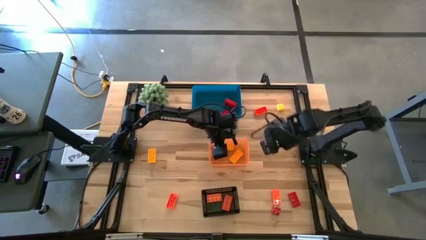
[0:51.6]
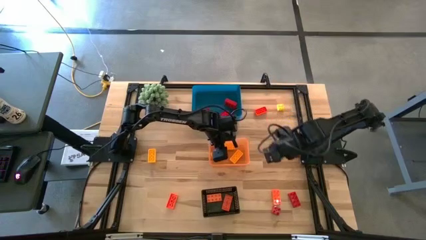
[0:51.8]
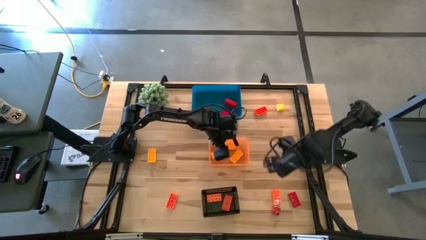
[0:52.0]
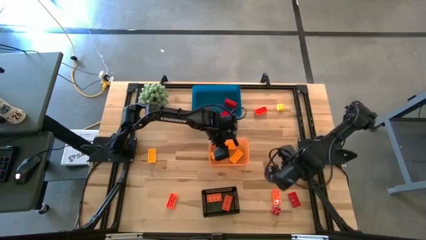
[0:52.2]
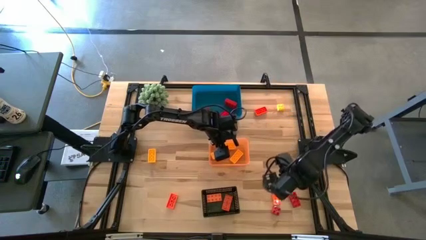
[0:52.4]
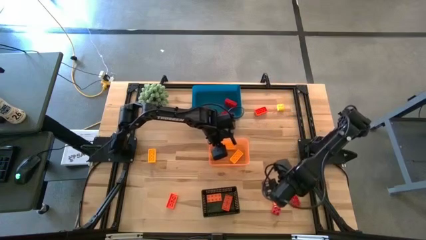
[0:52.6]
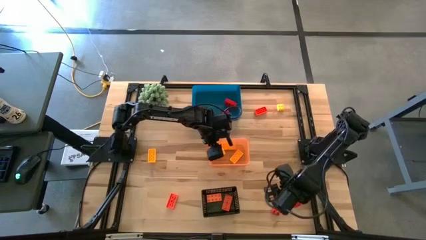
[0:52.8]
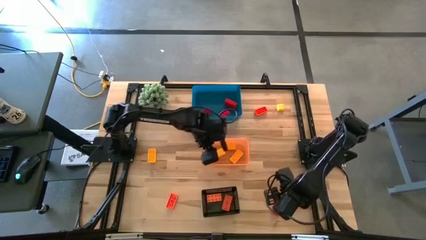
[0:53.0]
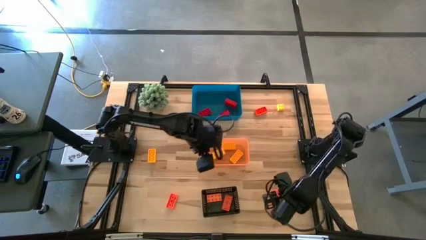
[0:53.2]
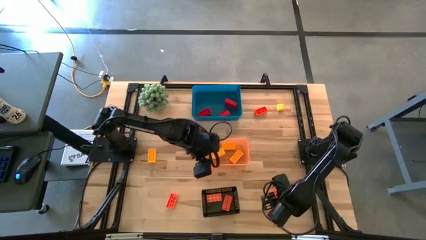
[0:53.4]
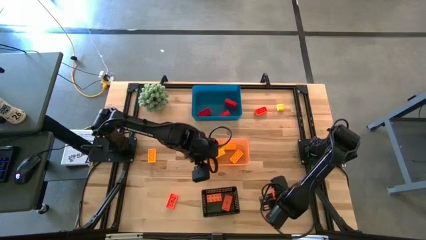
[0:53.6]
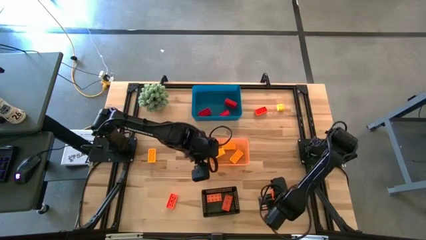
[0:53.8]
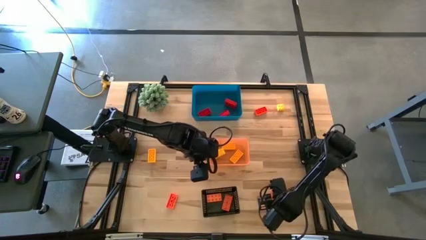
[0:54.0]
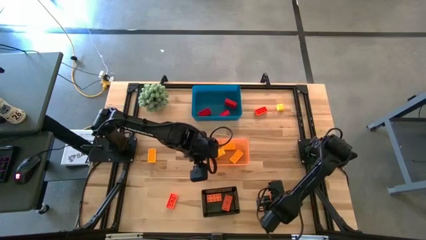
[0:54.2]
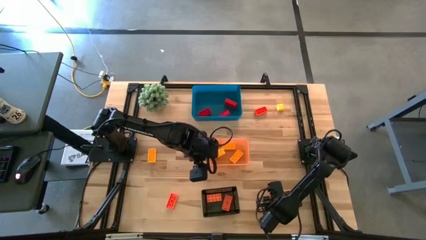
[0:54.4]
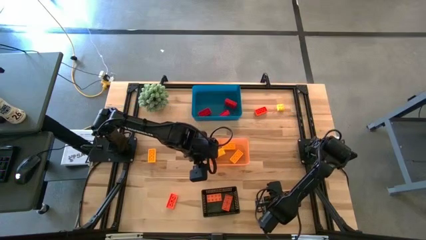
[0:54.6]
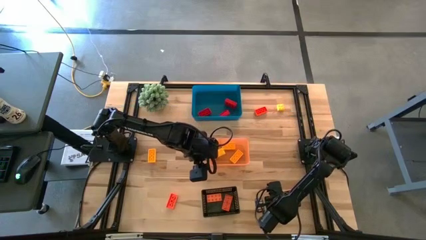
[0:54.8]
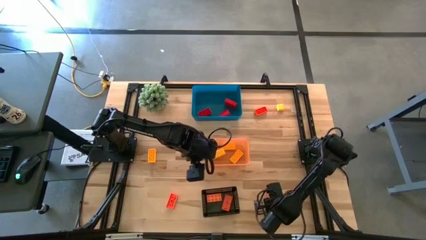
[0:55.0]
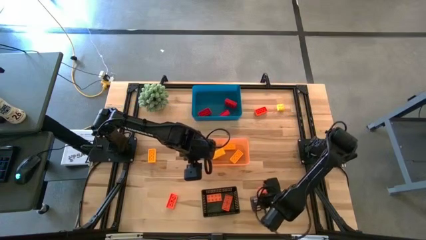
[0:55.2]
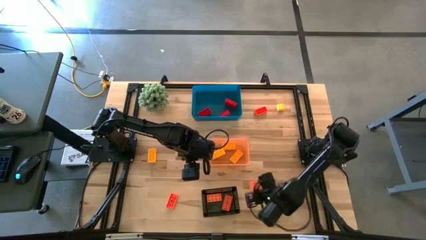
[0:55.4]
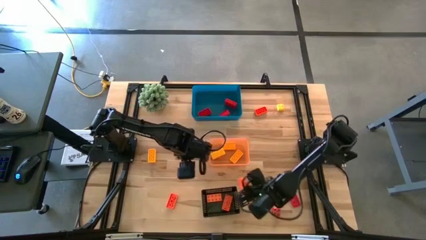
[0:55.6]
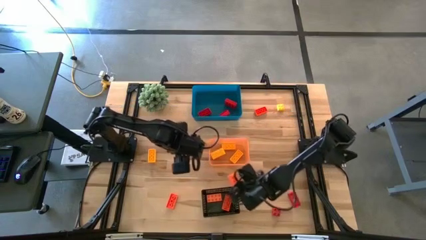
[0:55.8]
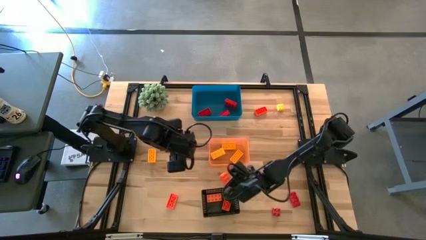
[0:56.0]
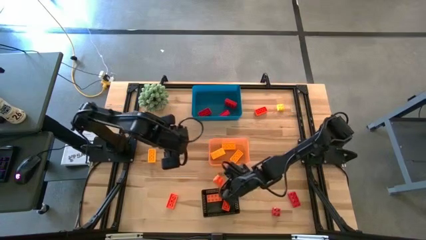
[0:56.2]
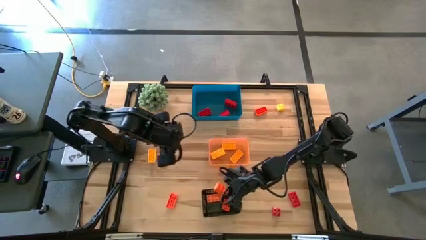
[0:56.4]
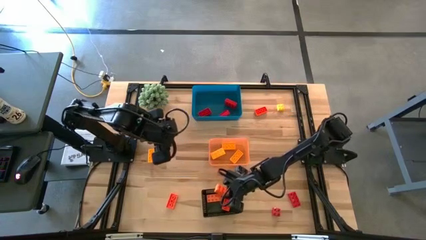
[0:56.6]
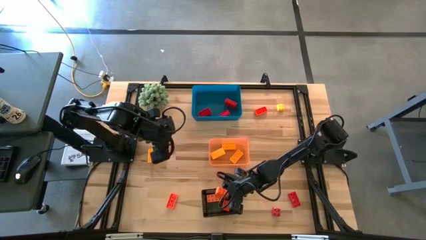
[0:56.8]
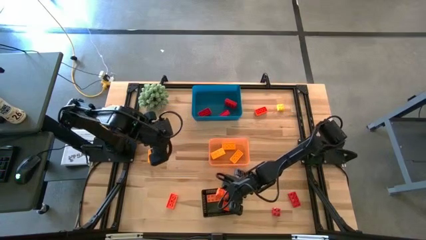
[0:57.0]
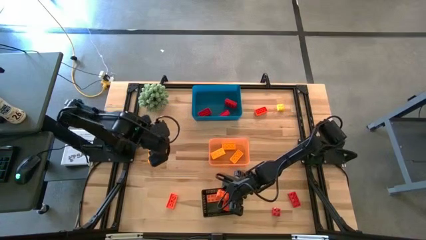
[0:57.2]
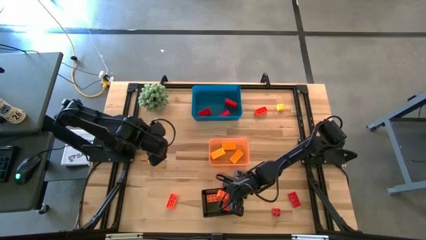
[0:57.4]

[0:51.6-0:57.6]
Task: Sort & place blocks by color
Put the orange game piece into the black bin

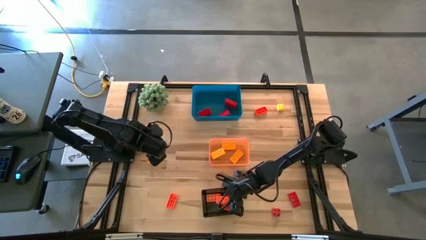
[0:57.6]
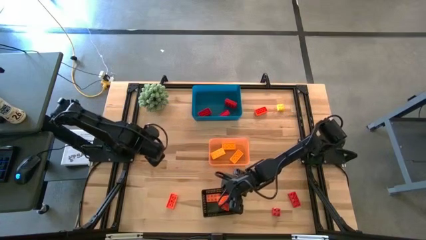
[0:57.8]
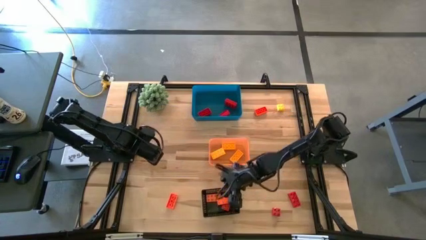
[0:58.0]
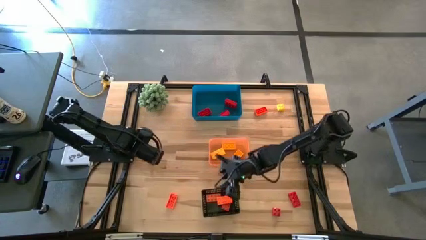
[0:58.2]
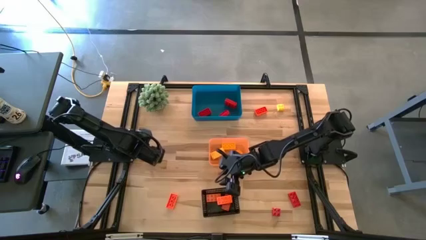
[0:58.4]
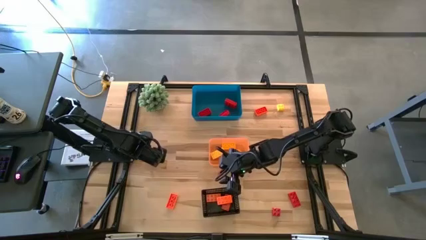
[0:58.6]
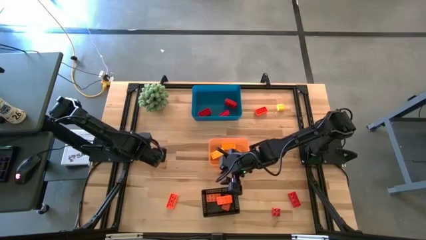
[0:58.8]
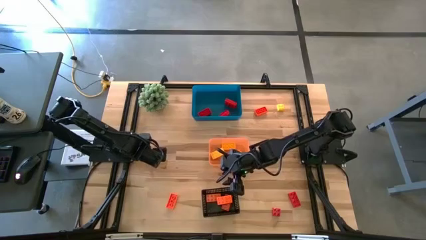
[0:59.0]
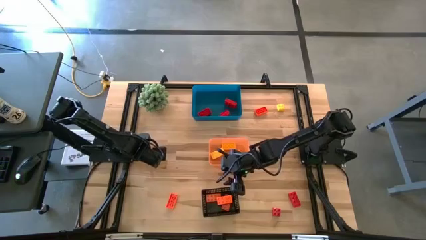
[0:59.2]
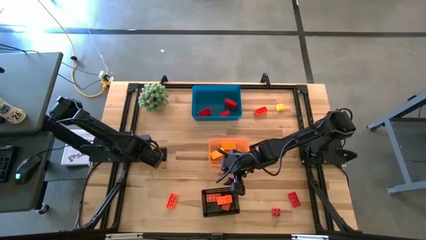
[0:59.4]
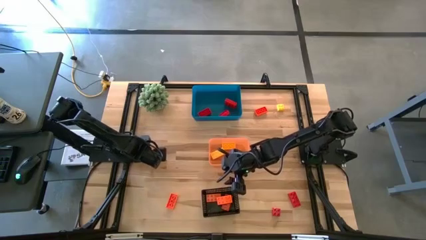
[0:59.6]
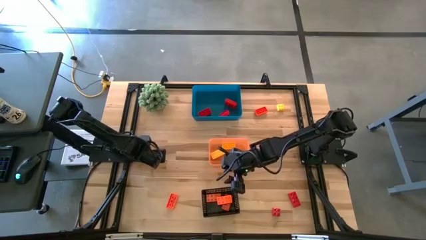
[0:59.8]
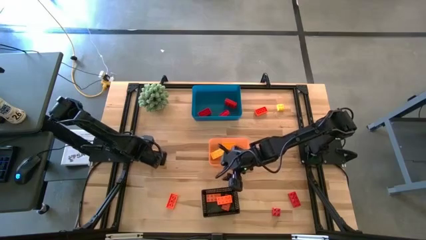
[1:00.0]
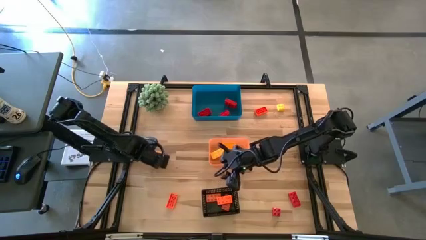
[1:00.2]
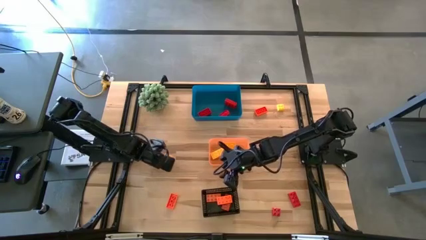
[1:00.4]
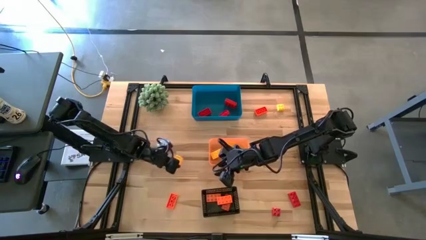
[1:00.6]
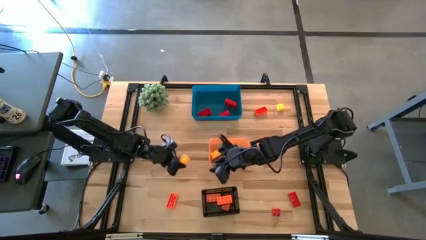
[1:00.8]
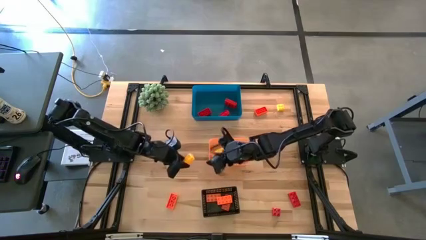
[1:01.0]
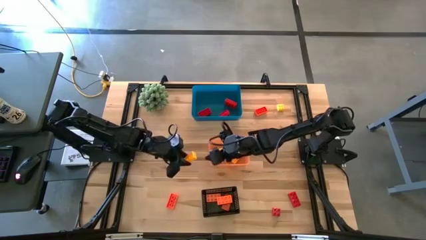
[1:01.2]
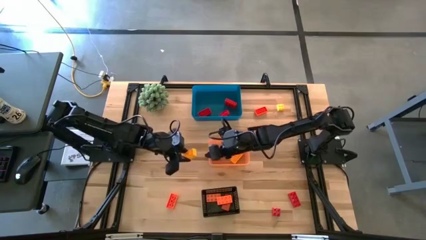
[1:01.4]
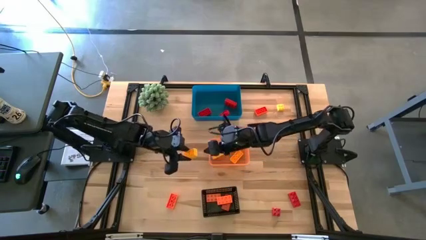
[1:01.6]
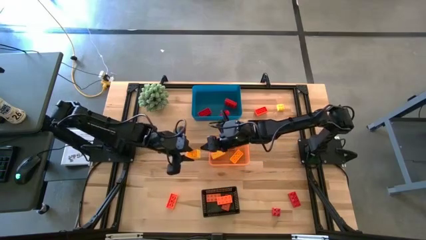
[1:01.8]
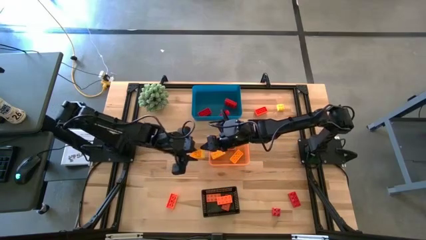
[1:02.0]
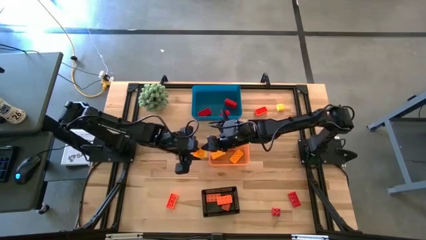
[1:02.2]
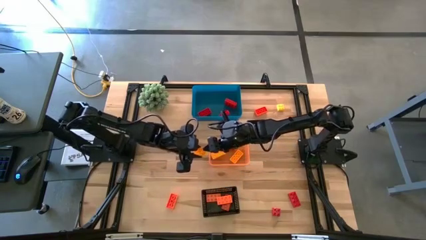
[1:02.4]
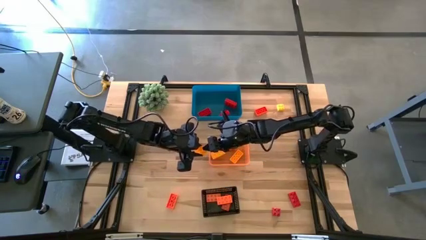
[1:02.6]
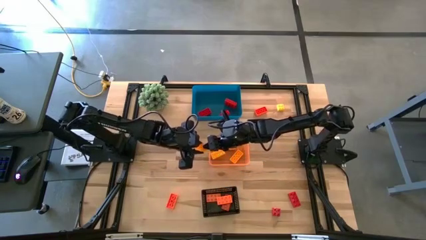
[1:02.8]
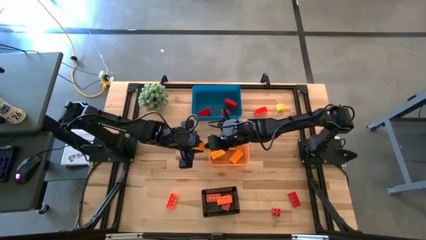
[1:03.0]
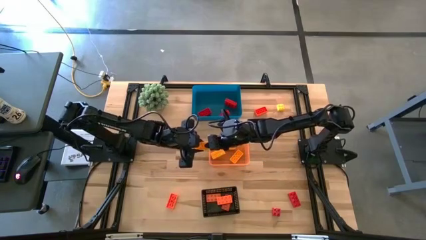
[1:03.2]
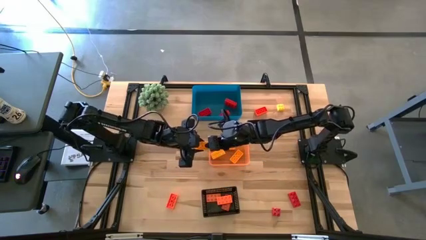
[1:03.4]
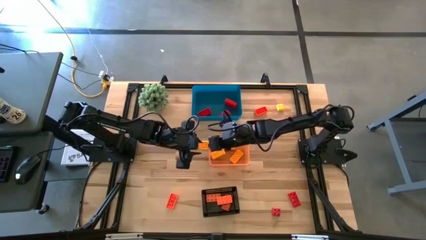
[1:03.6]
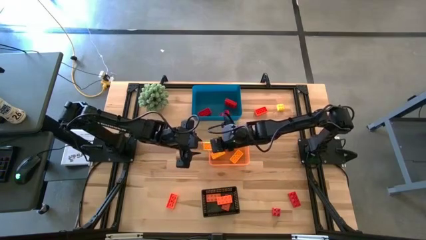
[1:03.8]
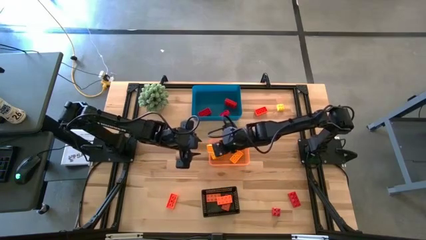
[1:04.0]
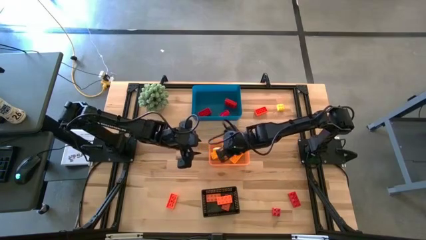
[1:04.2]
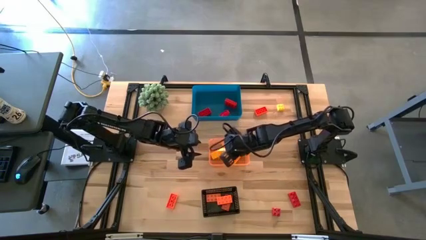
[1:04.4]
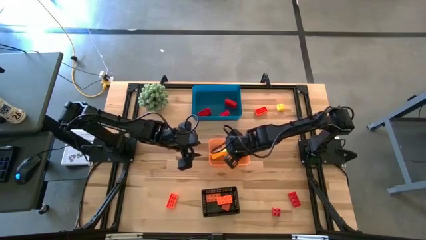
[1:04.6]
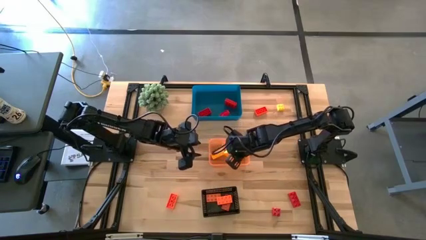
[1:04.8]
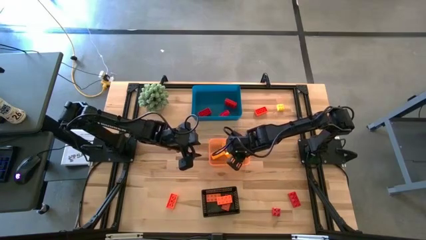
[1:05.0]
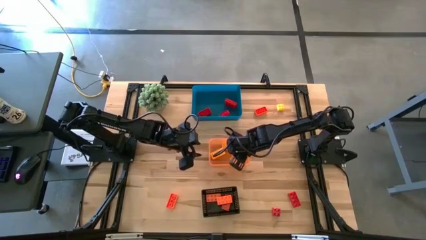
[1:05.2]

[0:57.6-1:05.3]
Put the yellow game piece into the orange bin
